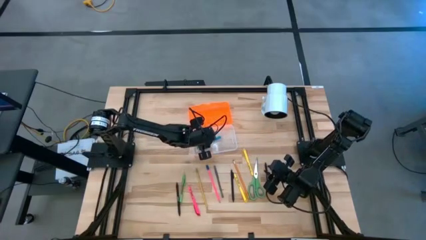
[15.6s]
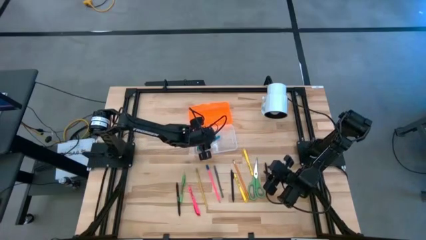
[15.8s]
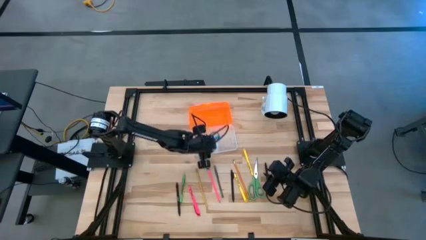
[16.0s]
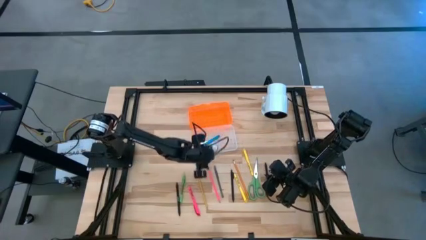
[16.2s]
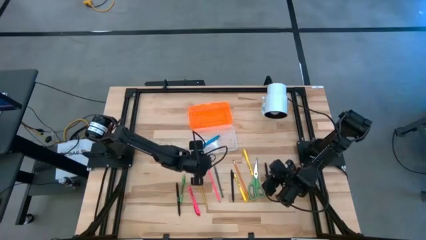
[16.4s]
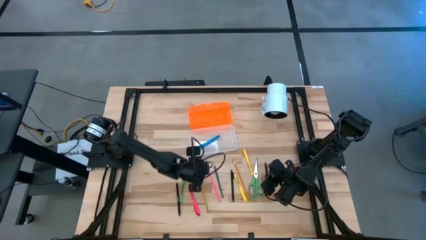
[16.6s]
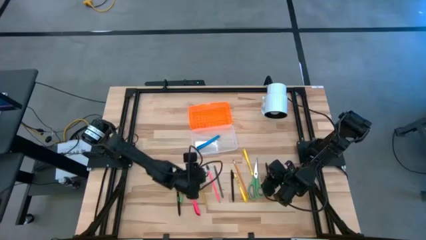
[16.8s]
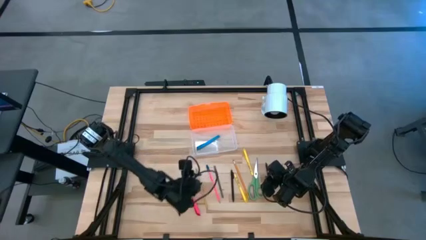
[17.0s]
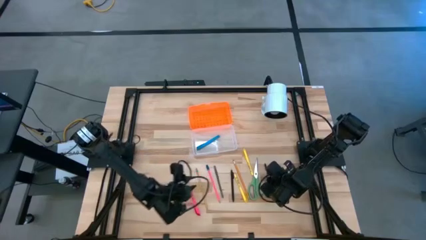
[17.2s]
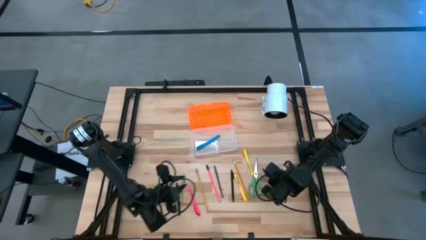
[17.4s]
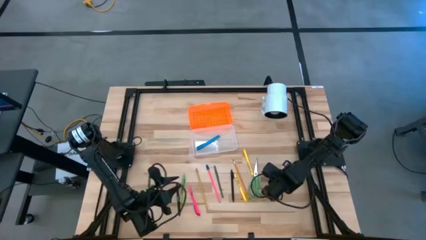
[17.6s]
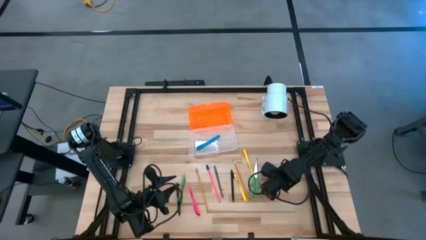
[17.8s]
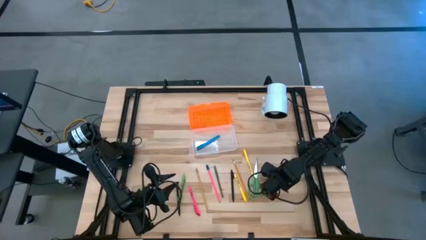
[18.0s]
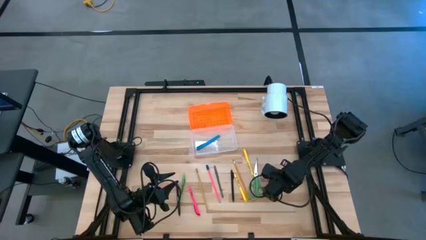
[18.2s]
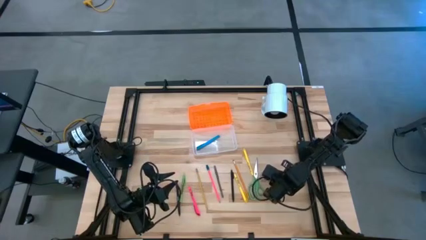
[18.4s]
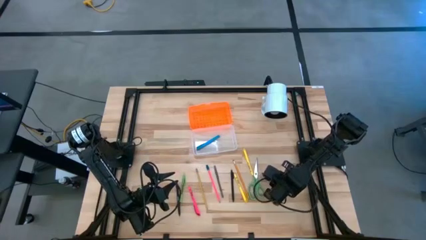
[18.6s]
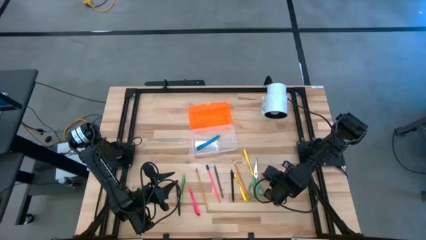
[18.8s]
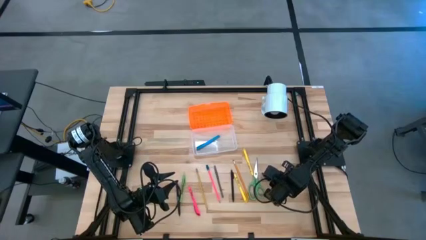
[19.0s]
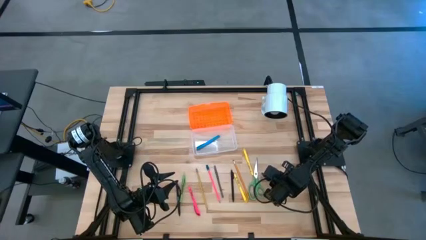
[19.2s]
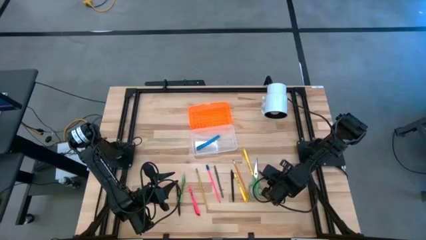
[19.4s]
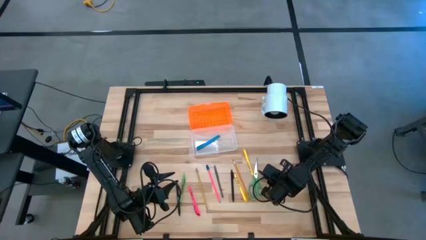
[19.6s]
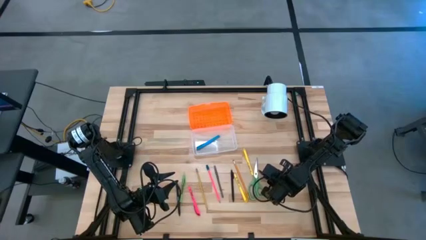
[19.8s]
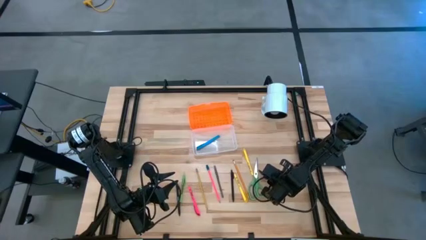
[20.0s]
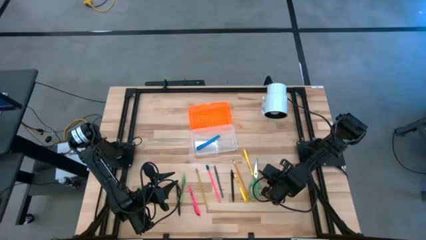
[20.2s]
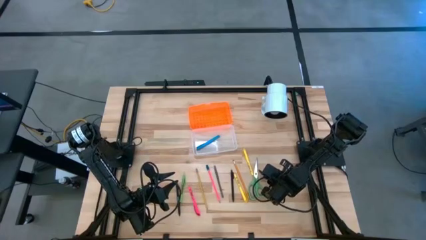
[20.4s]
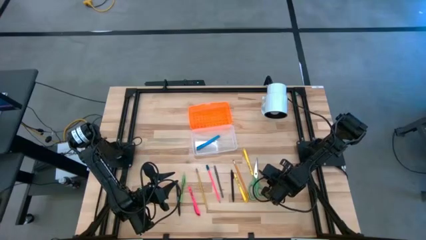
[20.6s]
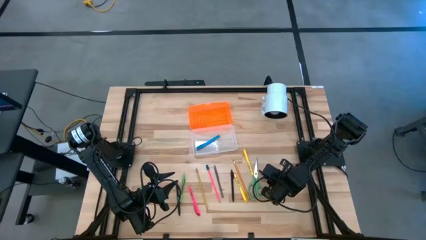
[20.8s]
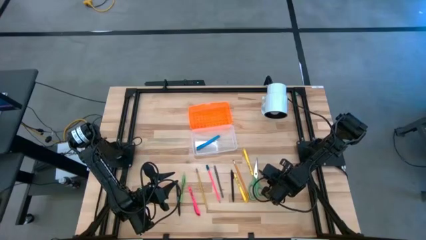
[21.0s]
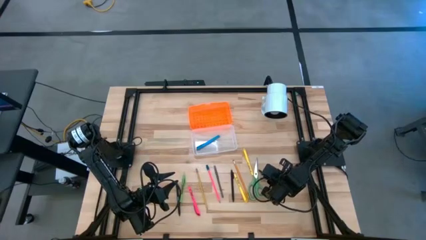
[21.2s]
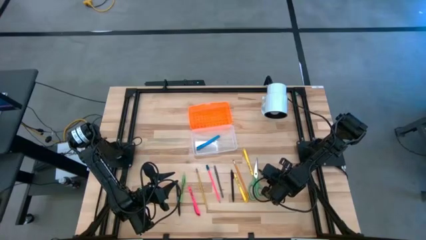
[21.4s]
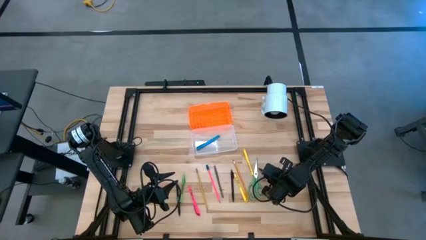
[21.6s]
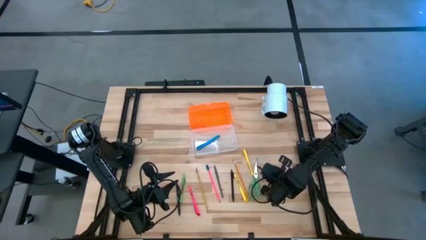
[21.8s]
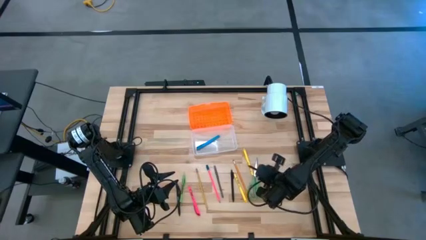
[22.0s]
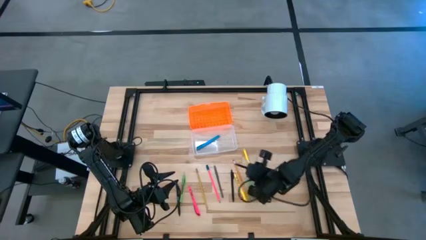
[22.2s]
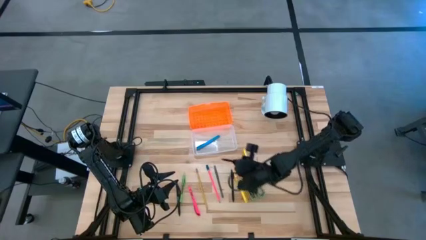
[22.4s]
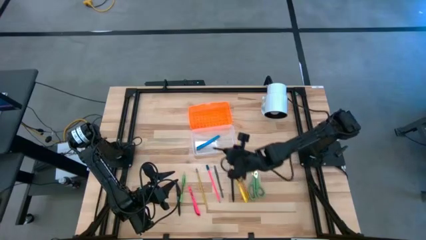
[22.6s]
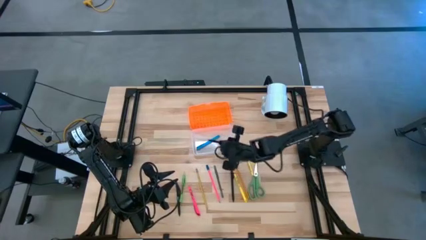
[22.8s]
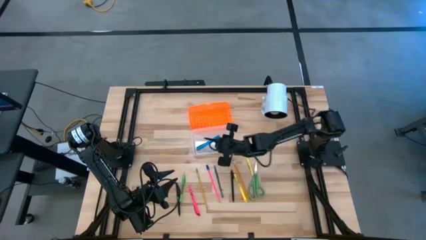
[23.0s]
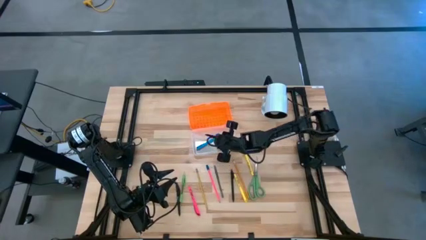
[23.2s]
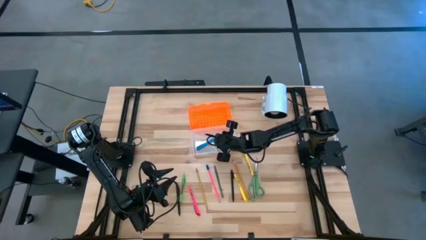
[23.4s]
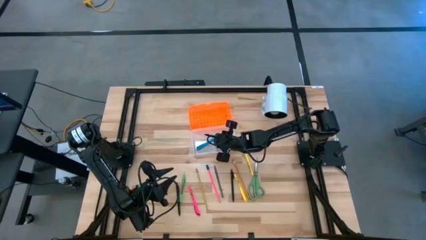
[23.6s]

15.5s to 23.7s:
Task: Pick & place school supplies into a supply box
Put the right black pen into the supply box

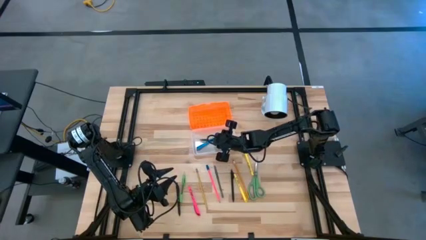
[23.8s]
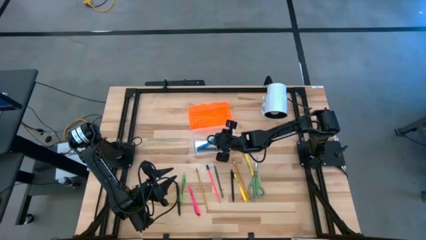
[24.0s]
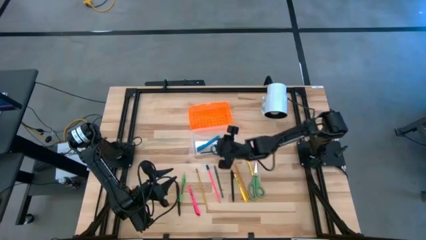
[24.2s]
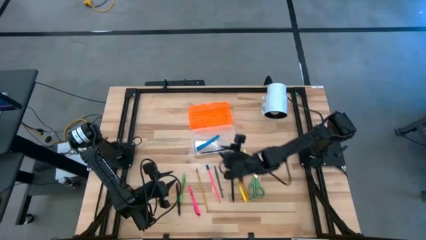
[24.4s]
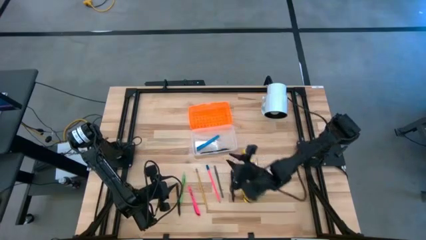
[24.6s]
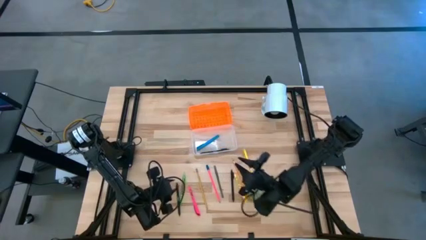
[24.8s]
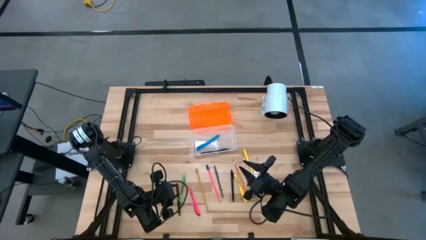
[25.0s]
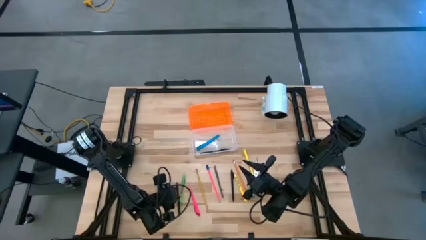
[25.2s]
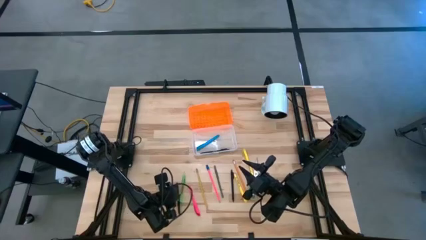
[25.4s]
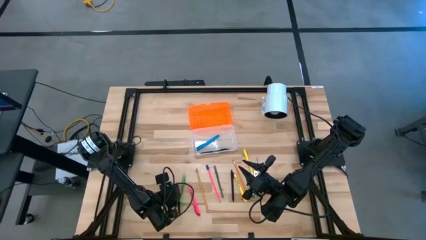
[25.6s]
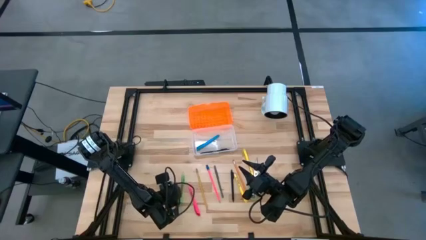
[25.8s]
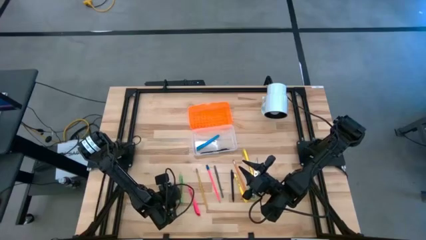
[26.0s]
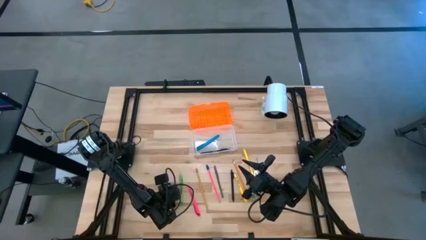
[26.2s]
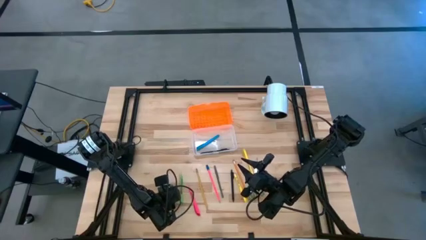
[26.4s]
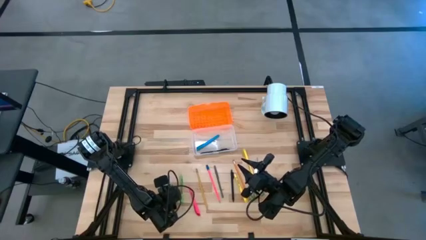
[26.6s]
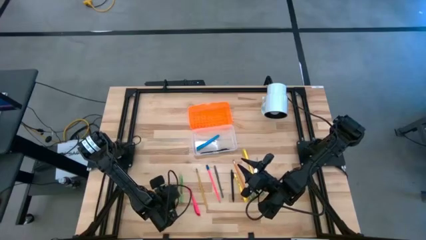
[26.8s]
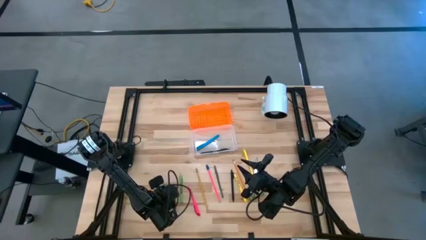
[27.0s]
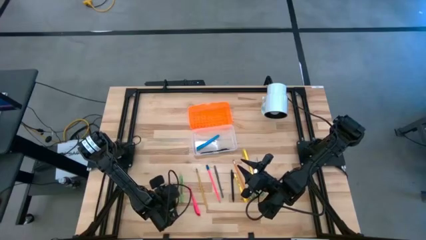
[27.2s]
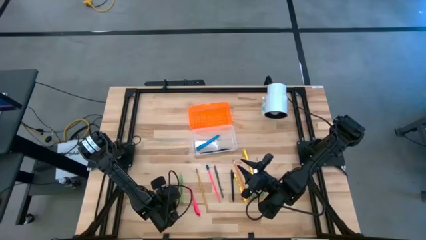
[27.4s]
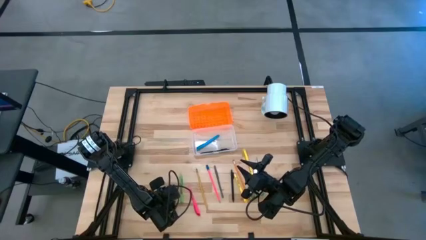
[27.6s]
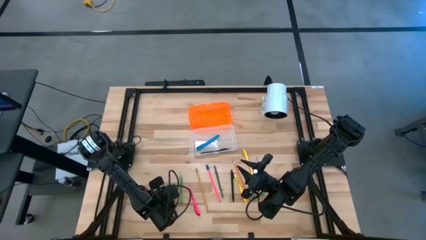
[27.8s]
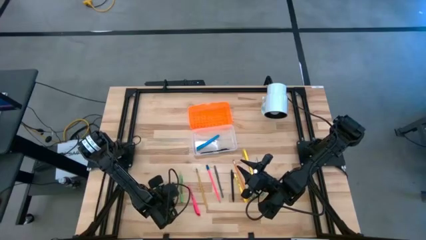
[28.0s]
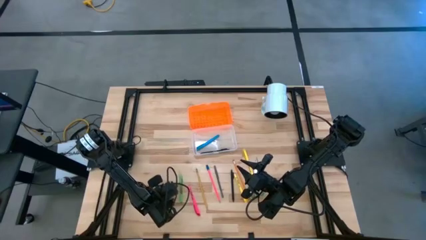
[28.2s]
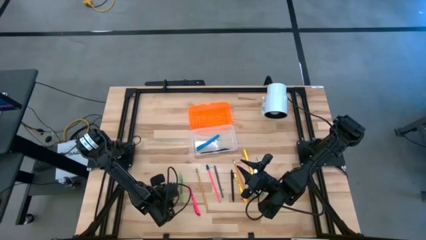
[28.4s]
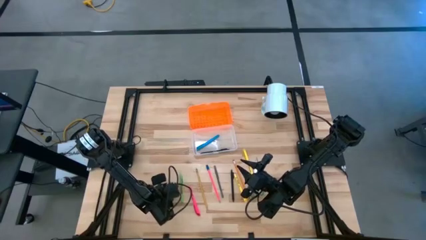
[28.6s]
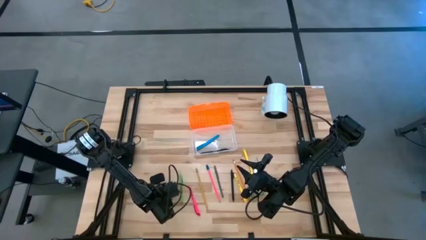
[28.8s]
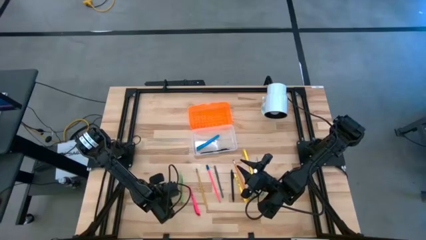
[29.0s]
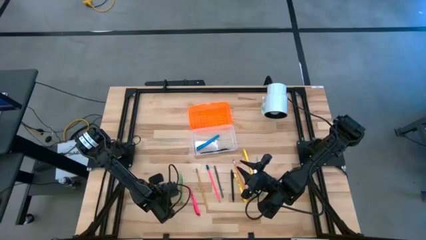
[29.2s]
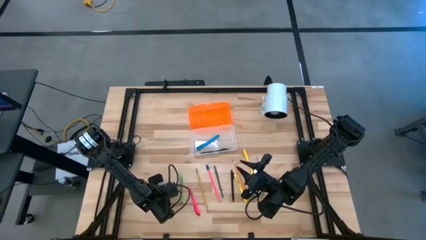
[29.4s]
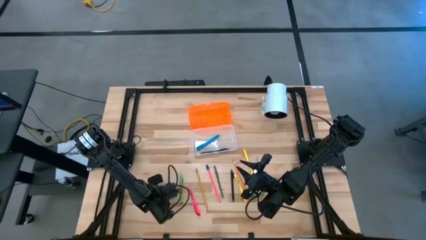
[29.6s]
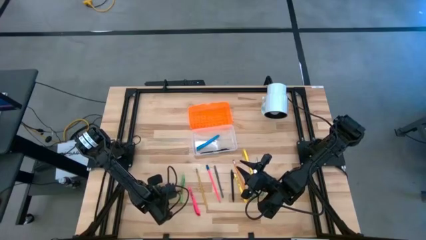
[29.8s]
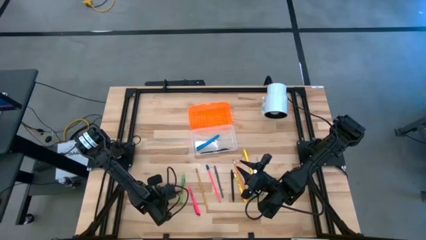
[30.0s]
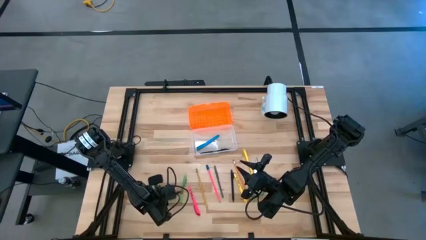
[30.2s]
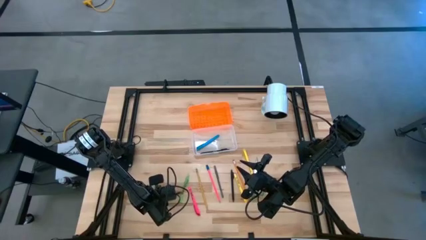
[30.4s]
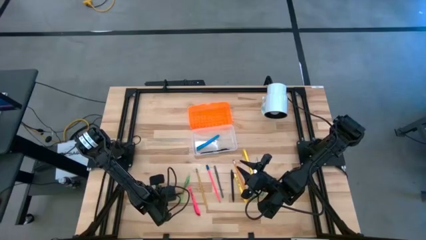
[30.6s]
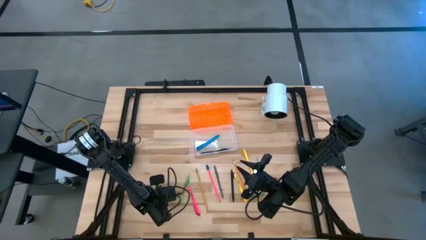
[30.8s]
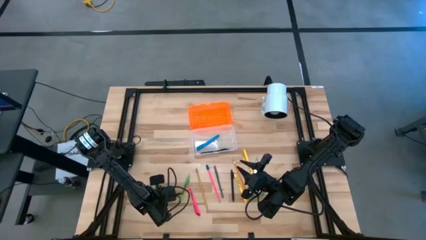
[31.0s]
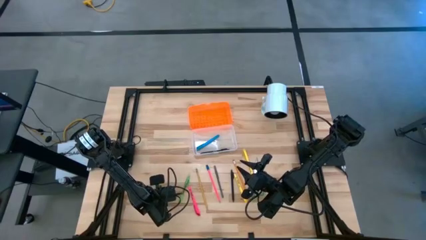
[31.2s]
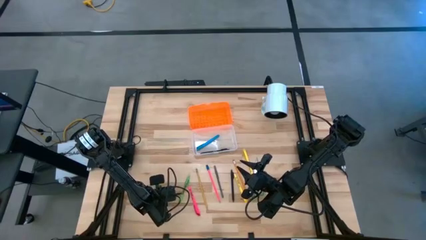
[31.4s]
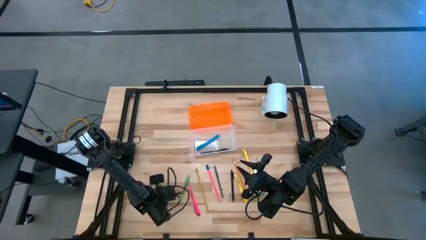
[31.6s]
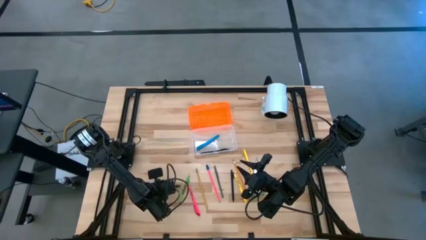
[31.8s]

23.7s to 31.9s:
Put the left black pen into the supply box
